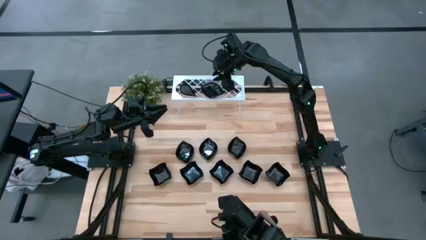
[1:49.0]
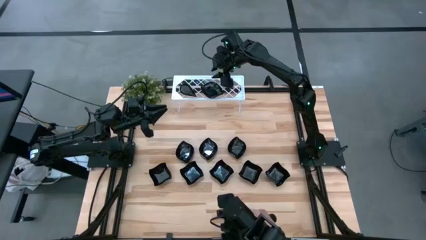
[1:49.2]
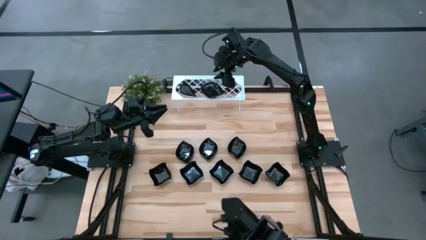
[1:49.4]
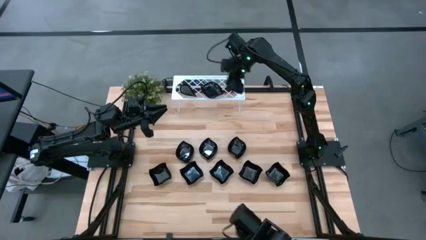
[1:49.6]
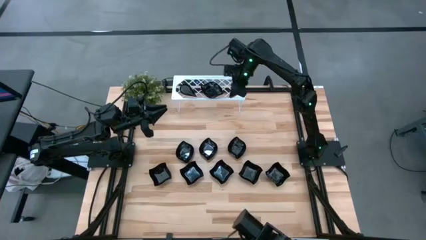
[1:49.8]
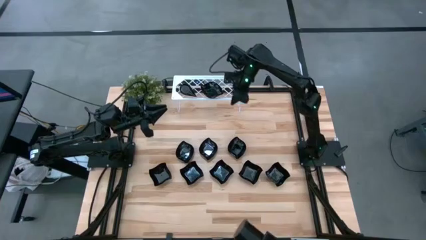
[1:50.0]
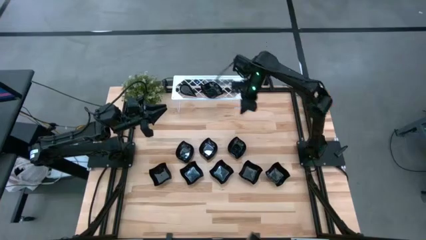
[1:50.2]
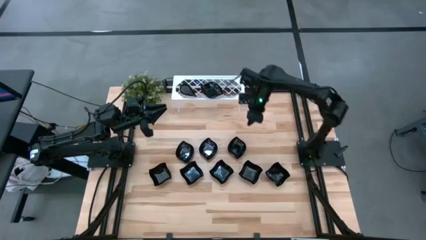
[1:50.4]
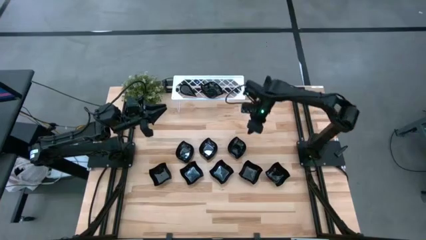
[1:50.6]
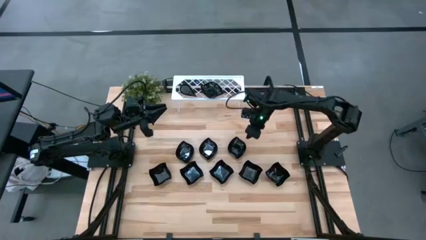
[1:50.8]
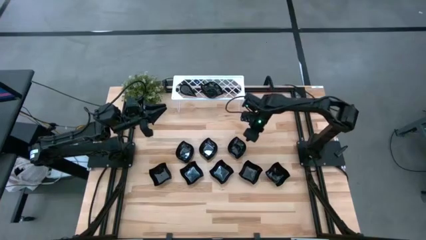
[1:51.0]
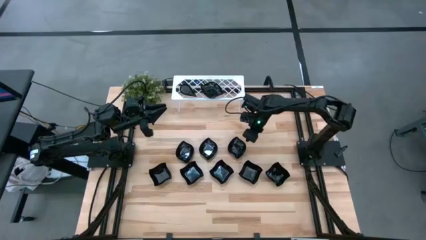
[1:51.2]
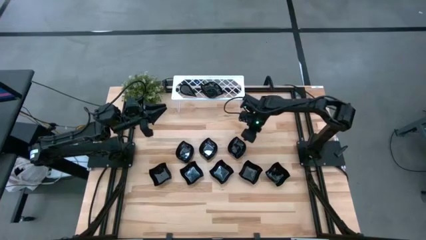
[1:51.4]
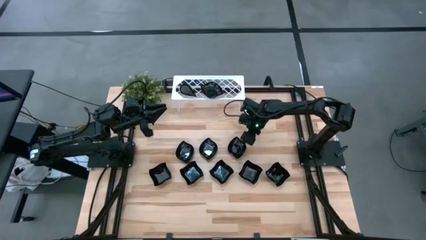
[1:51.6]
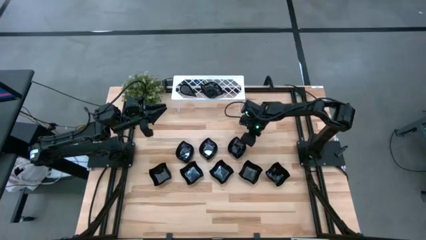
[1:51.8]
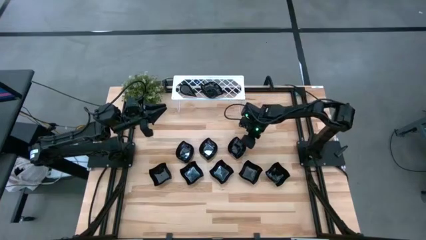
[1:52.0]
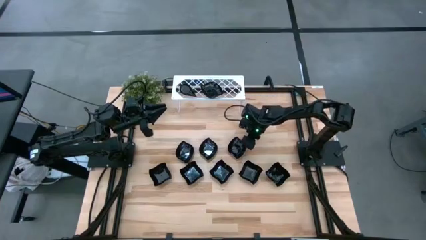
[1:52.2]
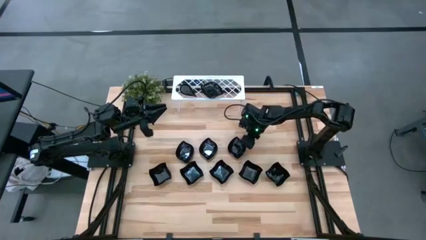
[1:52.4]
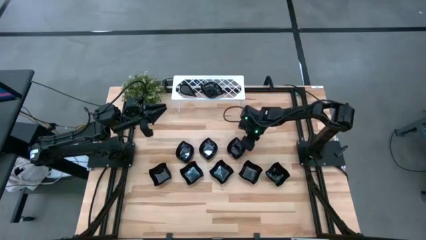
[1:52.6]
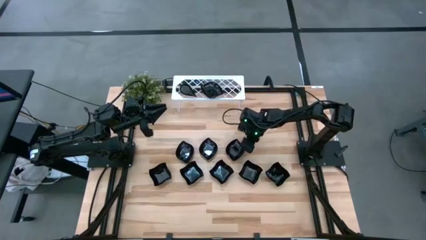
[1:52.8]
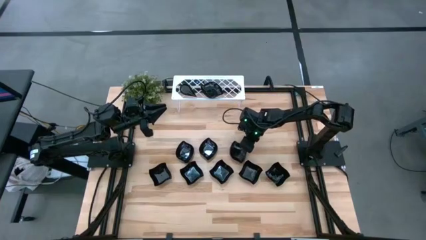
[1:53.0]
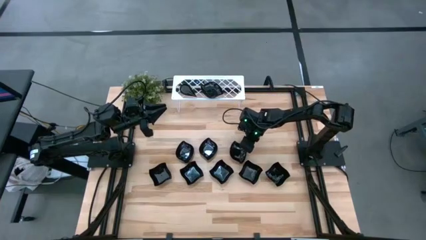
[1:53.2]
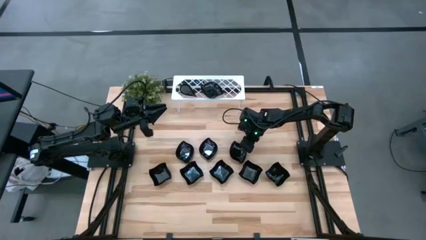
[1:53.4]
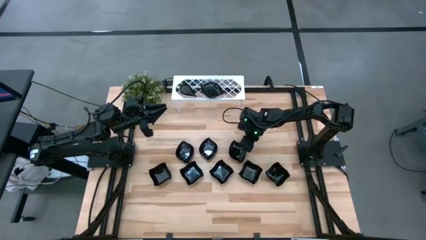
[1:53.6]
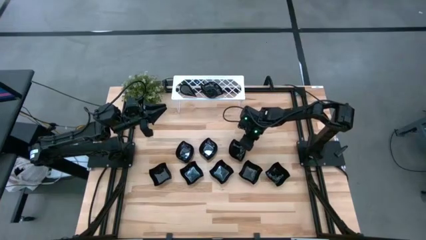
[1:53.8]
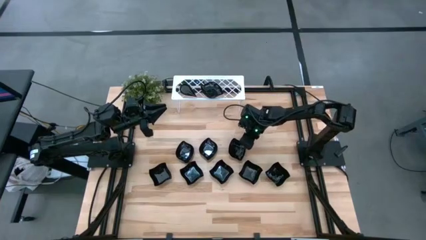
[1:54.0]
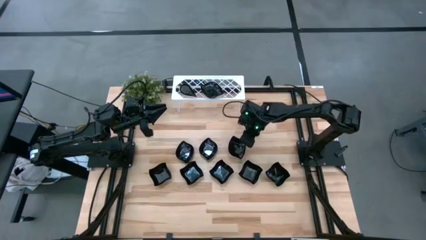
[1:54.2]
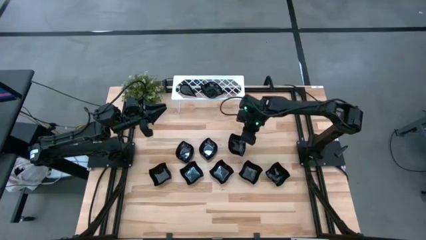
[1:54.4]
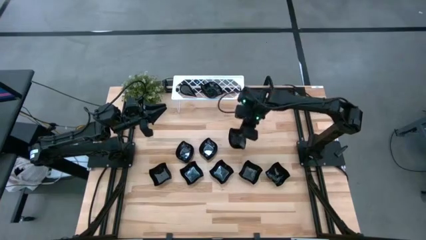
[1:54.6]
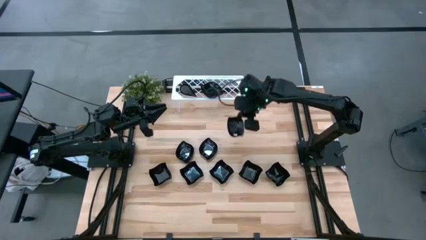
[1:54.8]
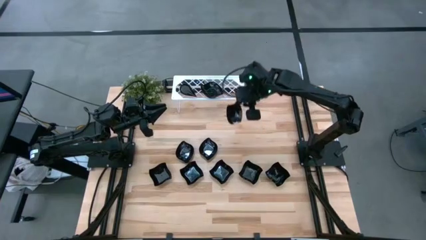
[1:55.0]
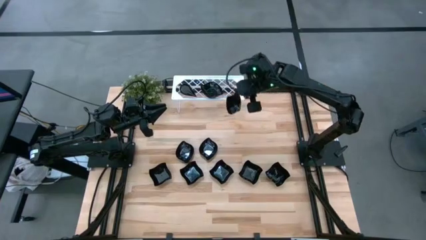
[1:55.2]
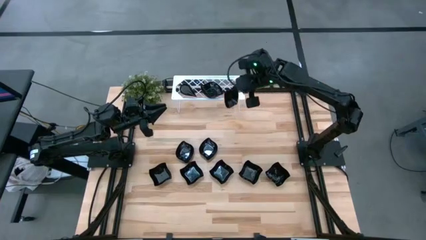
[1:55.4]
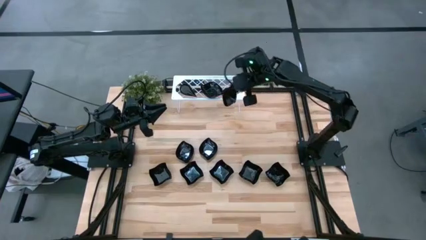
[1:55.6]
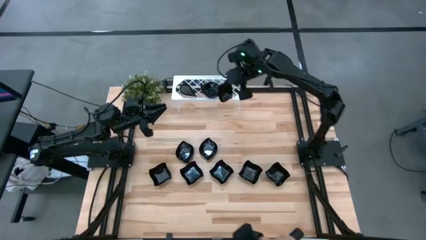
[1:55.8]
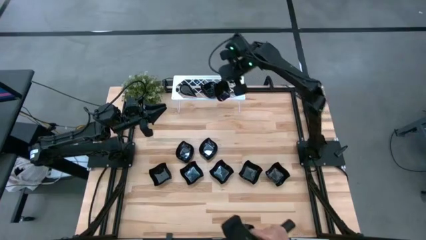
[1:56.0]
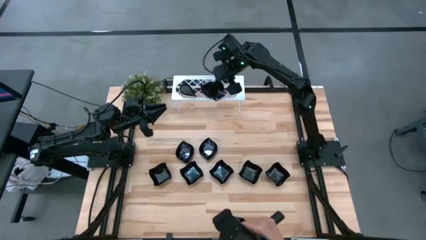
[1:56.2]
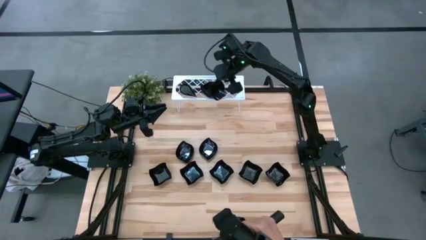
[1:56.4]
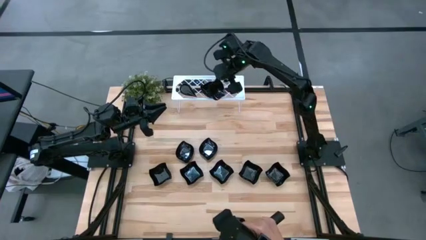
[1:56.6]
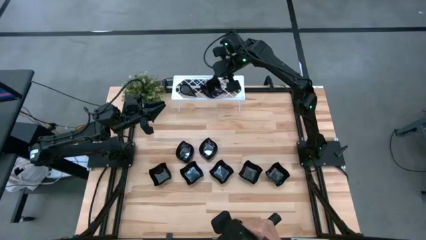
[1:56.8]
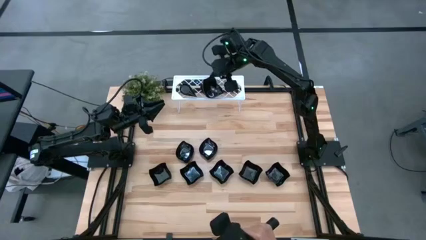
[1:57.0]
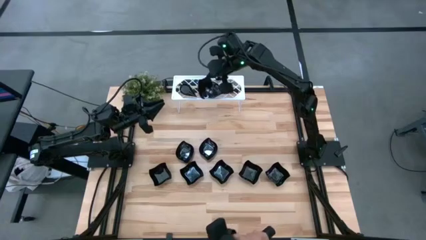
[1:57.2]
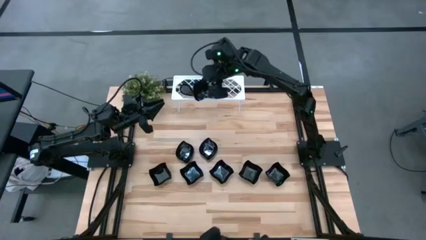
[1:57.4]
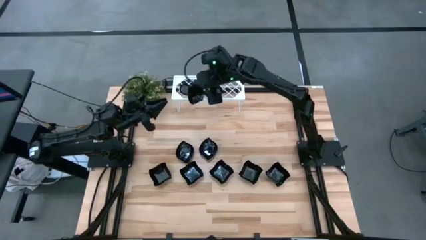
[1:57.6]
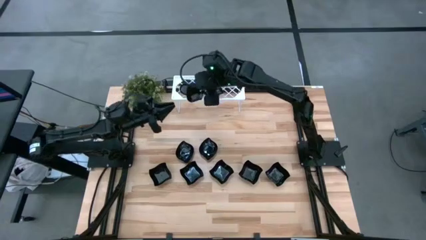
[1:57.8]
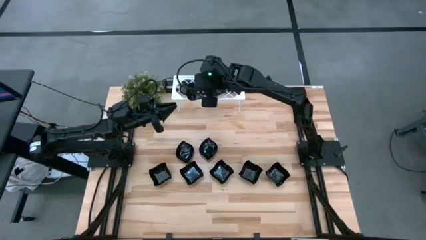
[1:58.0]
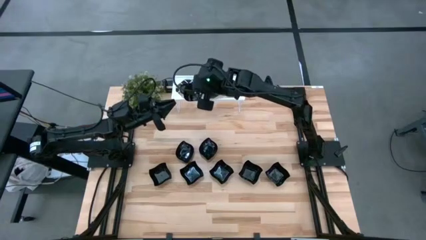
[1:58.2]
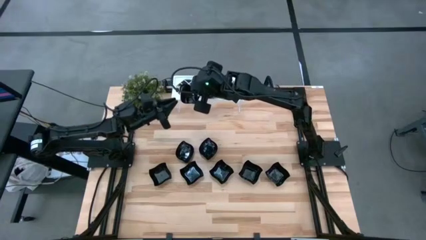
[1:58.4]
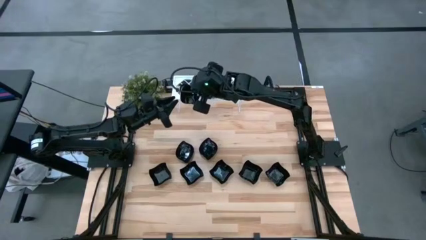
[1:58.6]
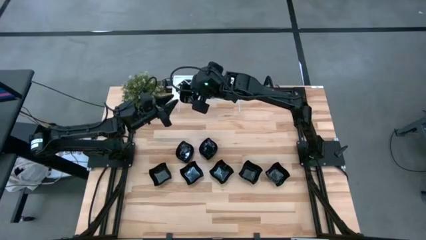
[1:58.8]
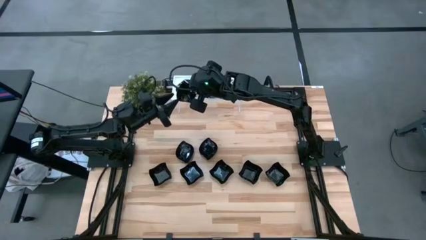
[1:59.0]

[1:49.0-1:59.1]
Task: Pick & Place Mini shaped plates
Stack the black leaf shaped plate on top of the black leaf shaped plate on the shelf
